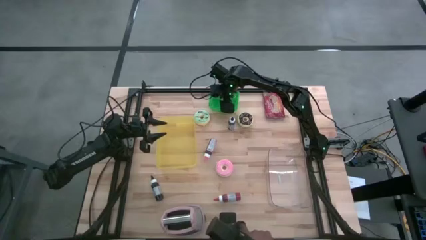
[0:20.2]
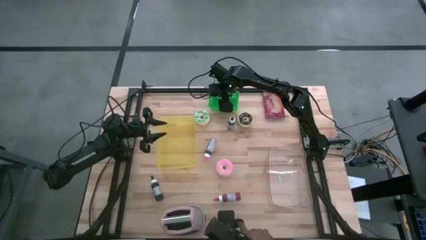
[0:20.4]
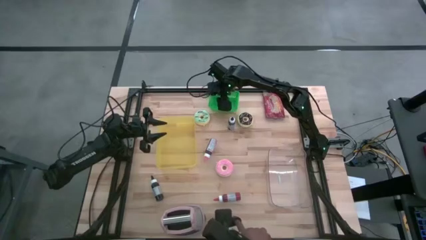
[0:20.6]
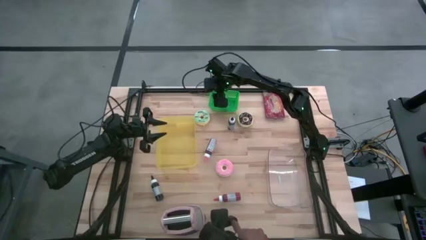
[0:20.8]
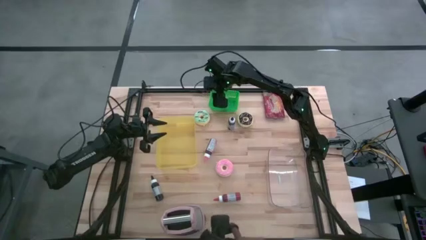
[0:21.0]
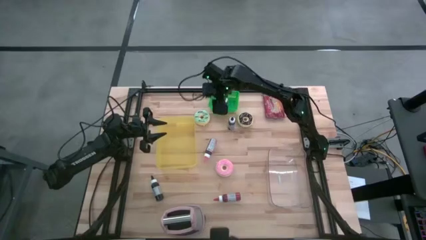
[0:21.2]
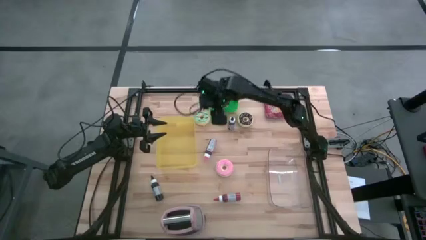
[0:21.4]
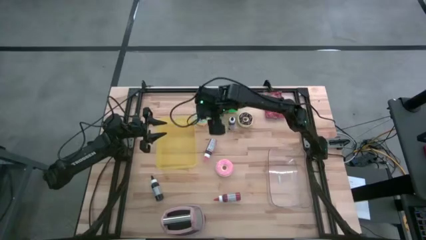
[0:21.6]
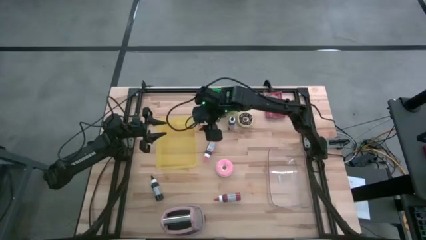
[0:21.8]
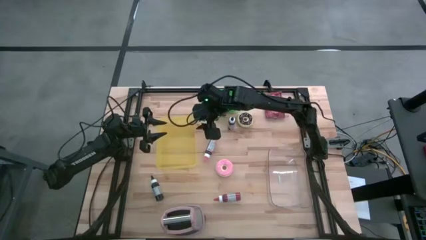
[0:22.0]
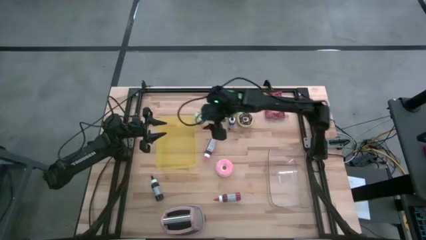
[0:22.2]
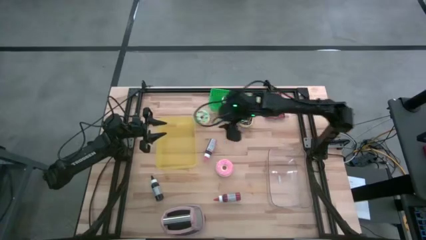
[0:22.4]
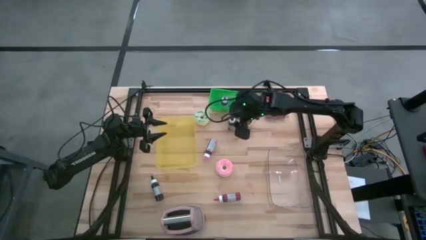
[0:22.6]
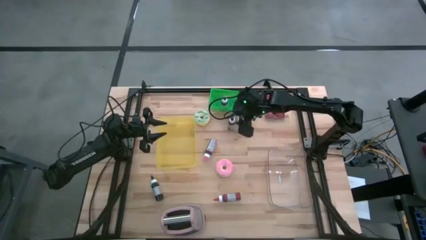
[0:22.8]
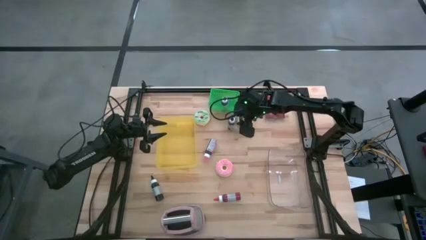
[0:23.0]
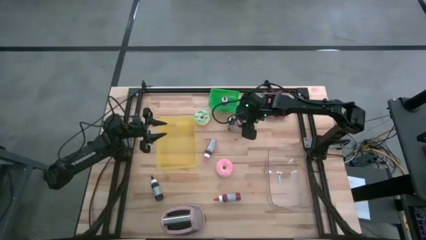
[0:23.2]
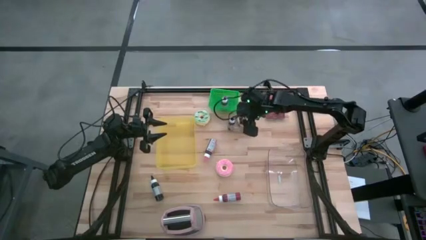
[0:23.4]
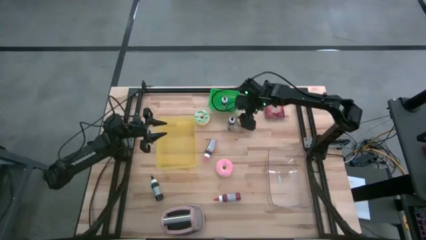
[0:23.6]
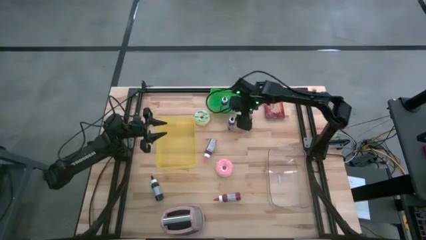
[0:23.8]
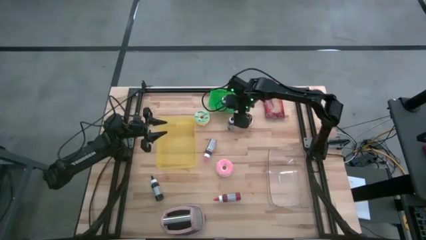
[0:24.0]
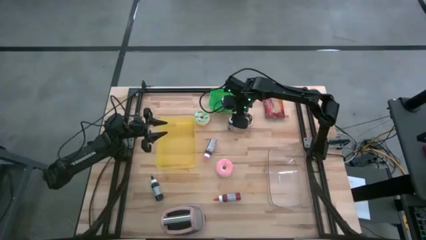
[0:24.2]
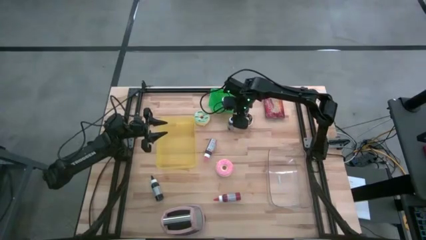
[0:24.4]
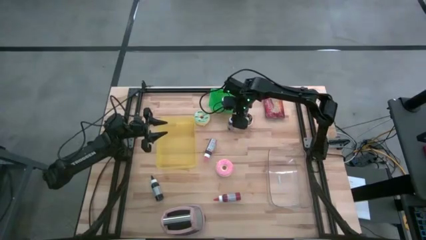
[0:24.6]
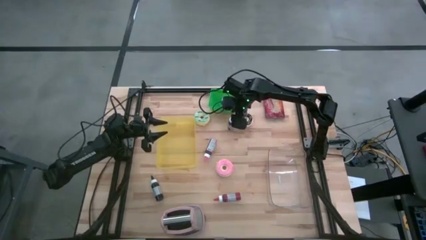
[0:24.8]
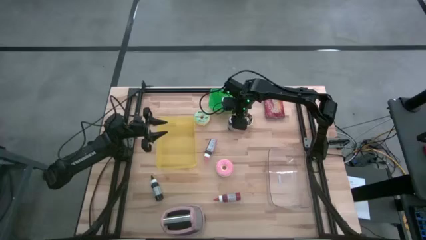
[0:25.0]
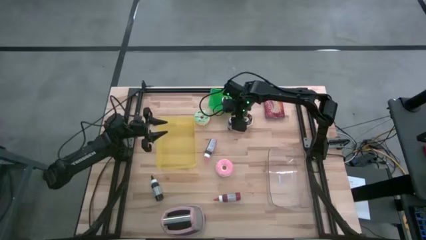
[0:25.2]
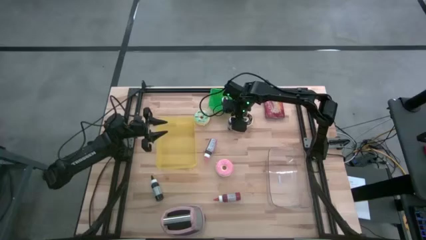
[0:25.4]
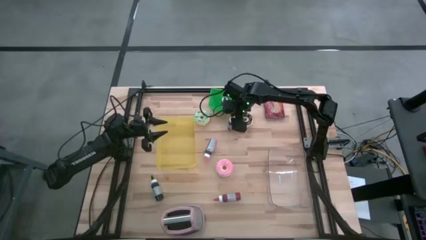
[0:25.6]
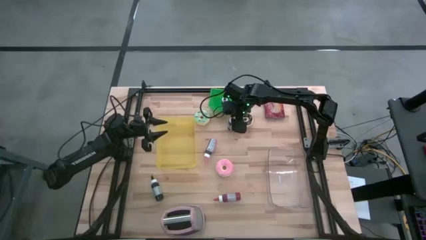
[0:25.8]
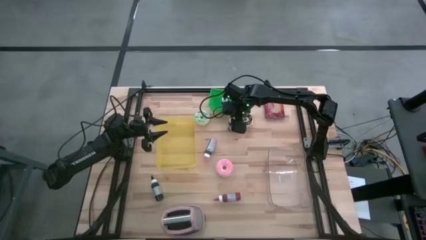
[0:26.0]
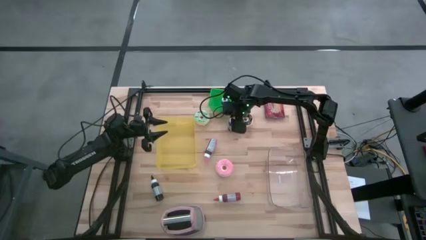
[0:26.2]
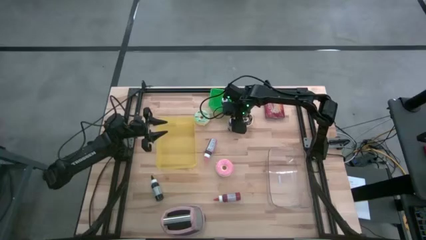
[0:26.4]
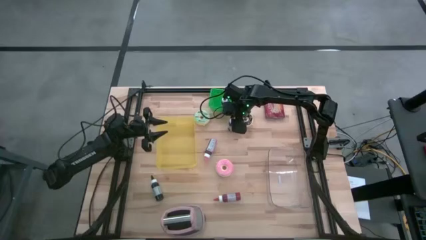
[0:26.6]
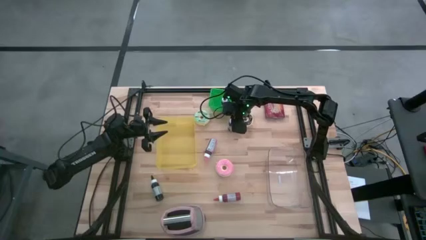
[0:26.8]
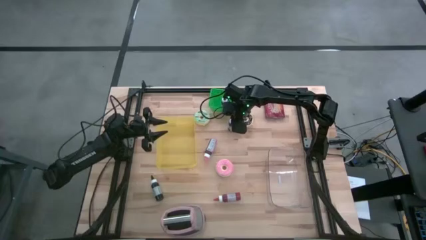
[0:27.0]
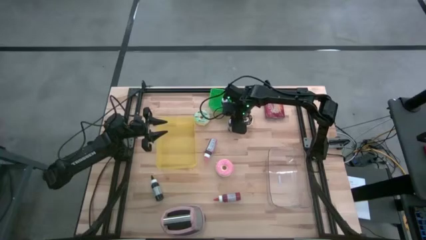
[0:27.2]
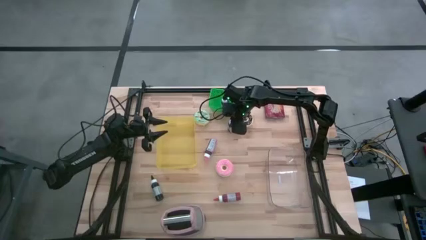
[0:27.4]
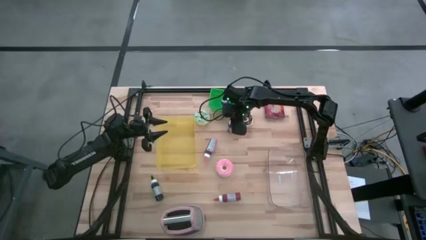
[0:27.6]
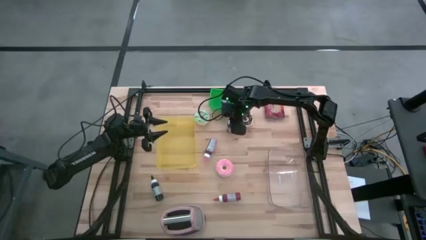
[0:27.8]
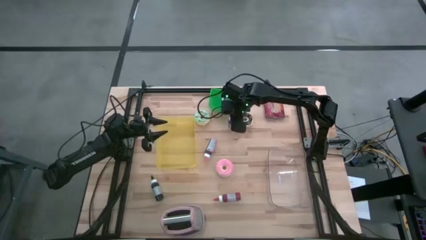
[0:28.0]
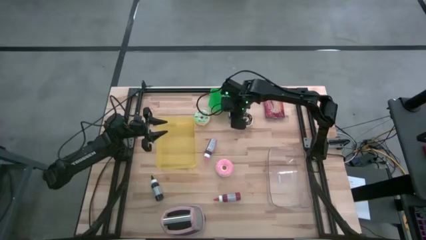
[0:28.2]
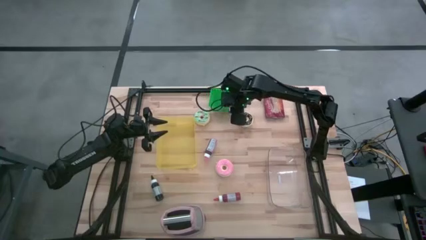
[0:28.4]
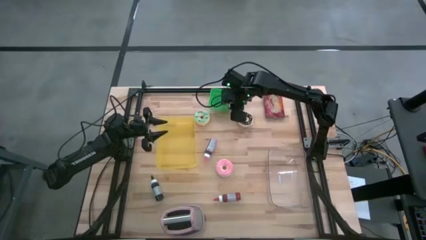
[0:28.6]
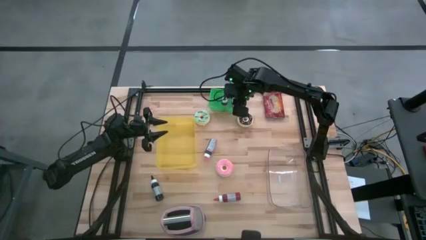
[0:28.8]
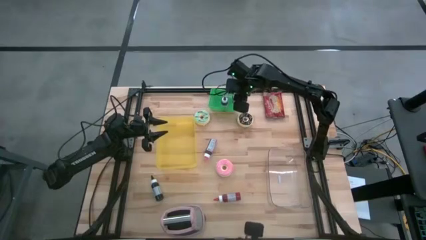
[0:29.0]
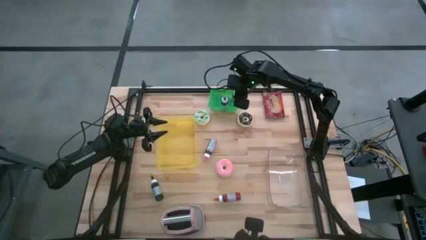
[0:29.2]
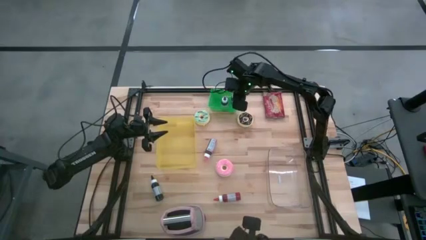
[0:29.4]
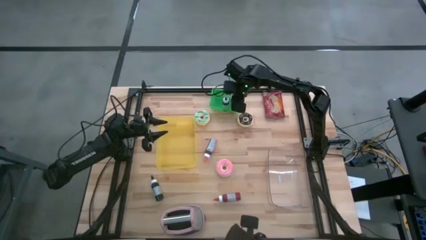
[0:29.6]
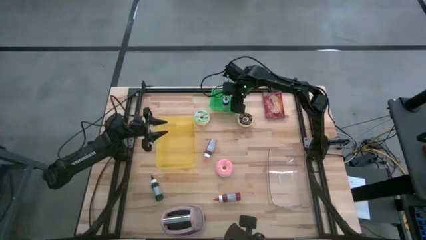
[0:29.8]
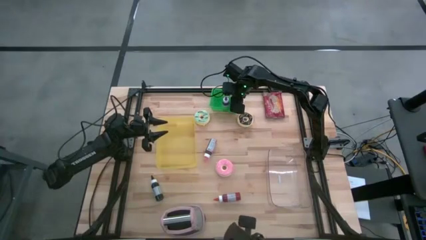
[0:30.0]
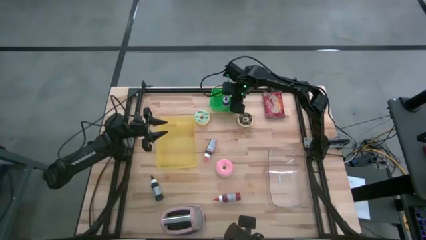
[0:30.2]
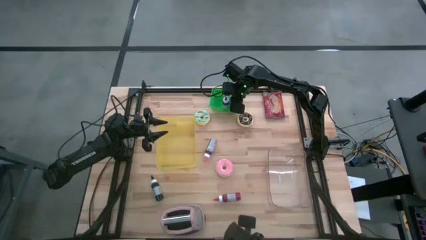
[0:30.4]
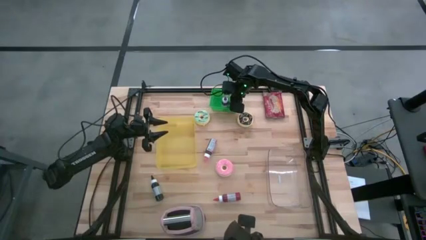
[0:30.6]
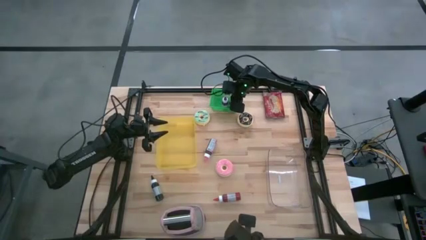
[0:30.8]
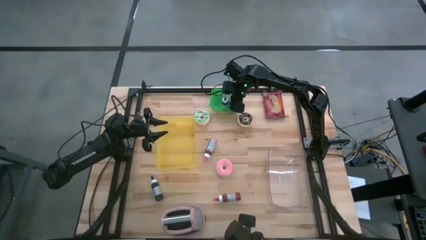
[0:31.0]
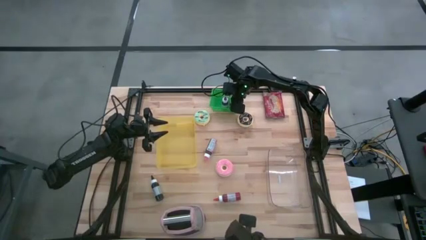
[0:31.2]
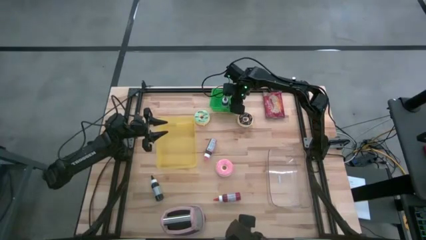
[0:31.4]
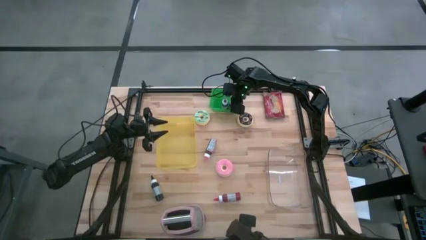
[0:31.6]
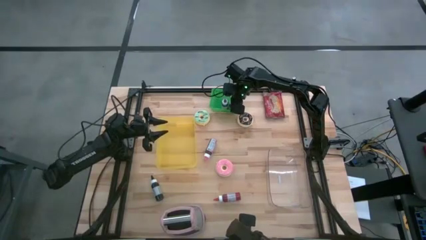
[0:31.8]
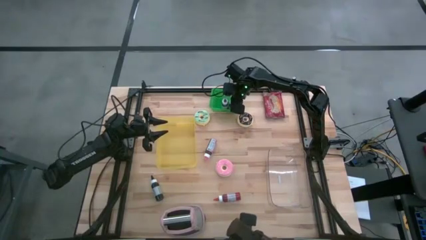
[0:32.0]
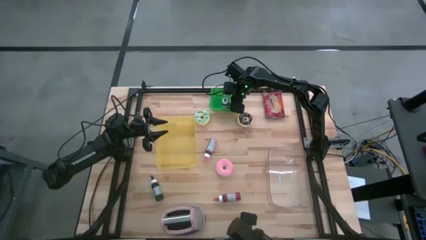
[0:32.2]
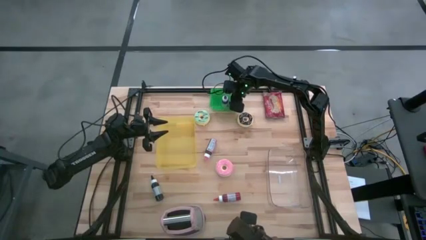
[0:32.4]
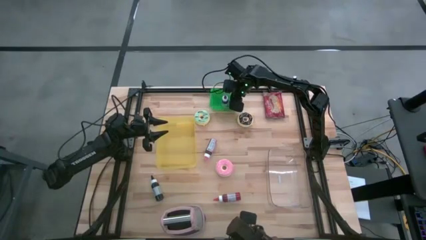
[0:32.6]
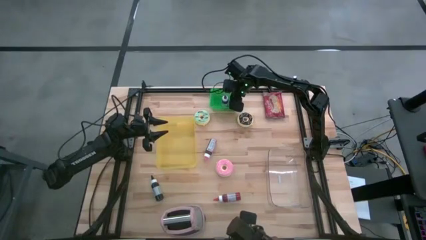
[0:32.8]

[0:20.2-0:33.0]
Task: Pick & Place Food Item
Put the top black food coloring bottle into the green bin

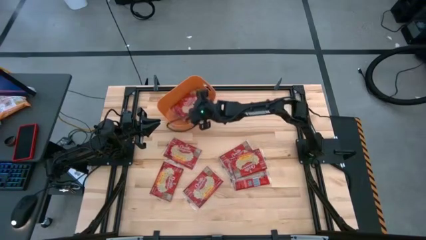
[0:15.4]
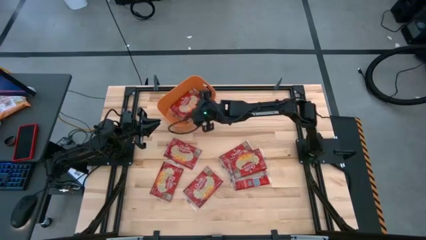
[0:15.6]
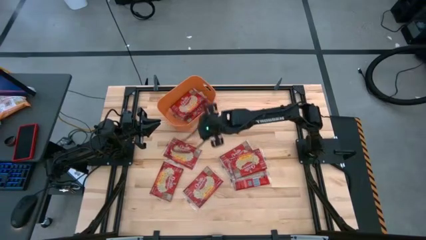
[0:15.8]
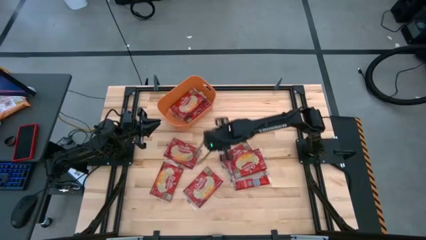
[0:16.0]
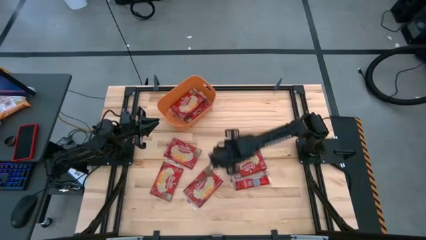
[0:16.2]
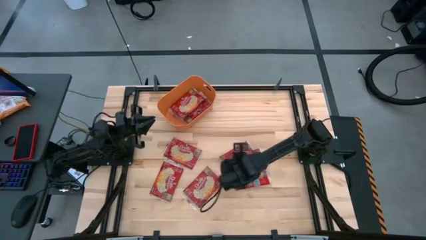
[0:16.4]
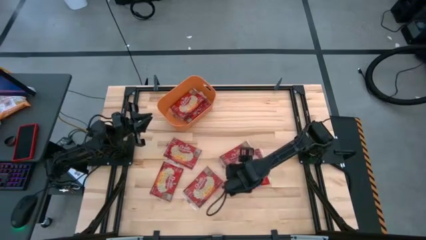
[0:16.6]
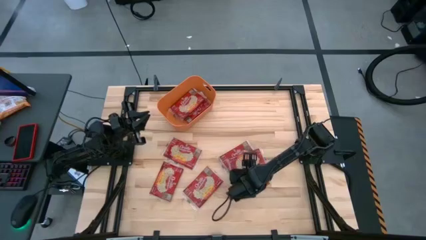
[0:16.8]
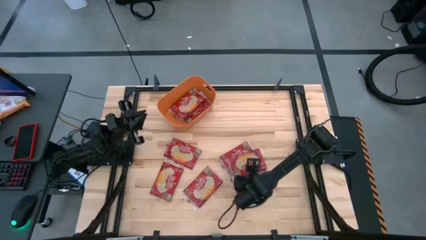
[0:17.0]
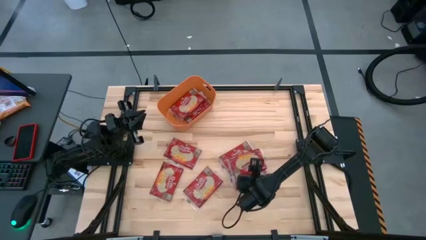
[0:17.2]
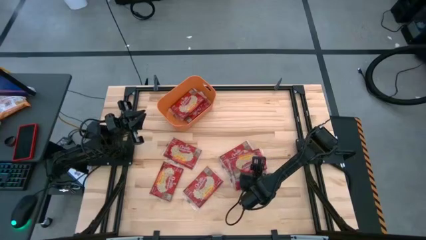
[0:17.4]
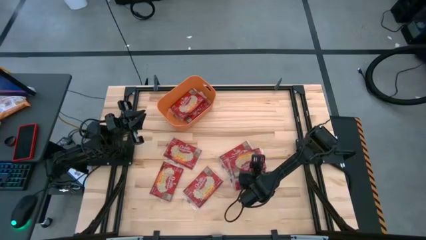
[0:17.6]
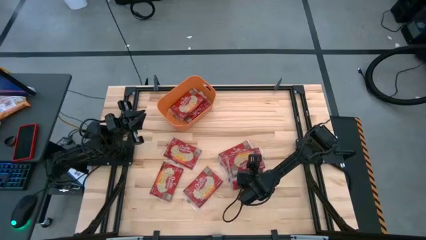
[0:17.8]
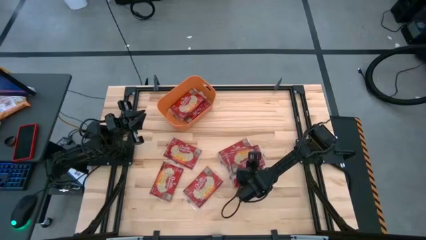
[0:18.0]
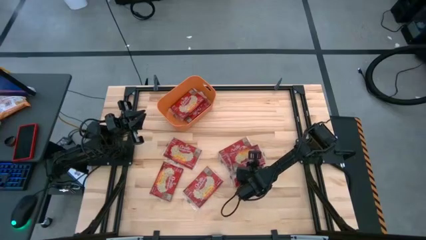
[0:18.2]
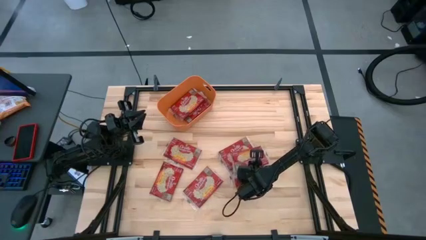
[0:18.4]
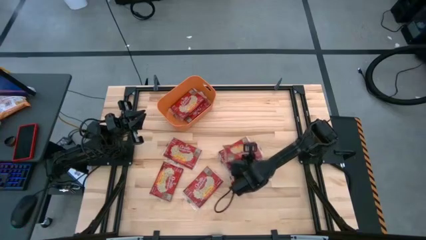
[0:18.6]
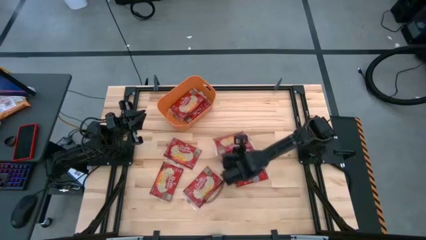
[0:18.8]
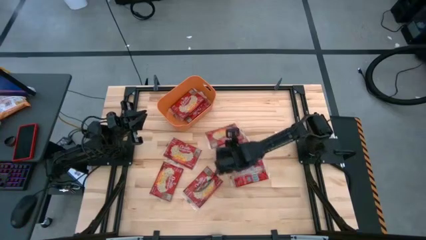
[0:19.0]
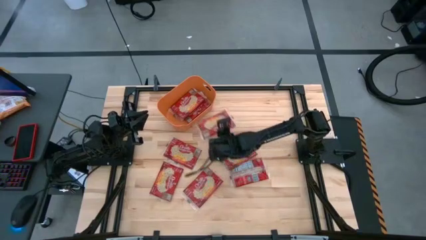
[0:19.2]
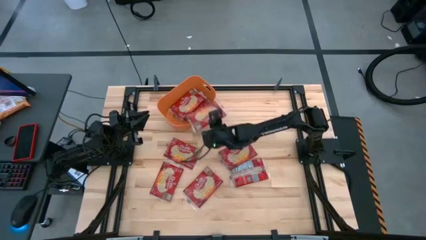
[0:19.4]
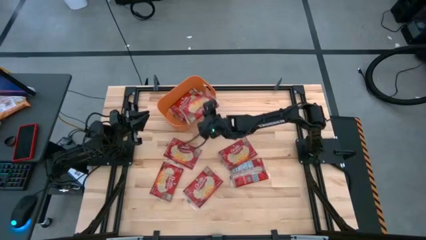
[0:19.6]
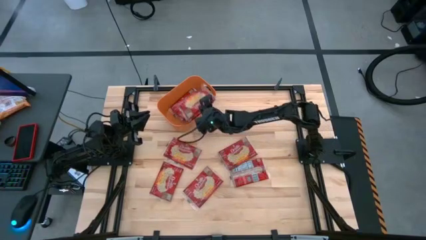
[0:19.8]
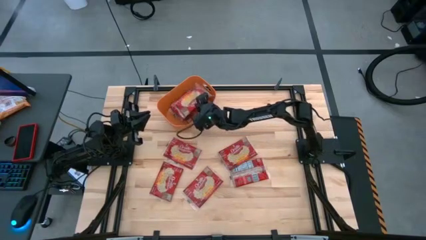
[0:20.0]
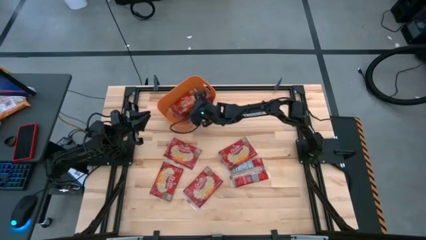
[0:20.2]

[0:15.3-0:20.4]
Task: Sort popcorn bags into baskets
Put the red popcorn bag into the orange bin
